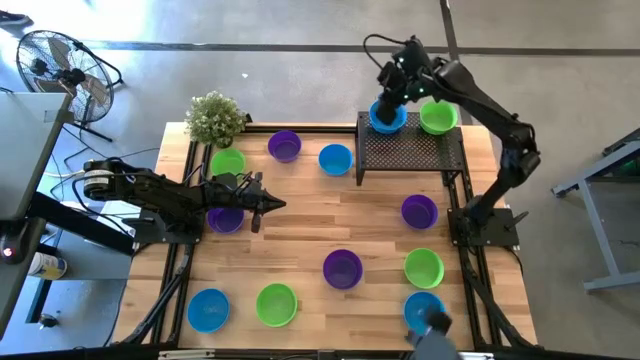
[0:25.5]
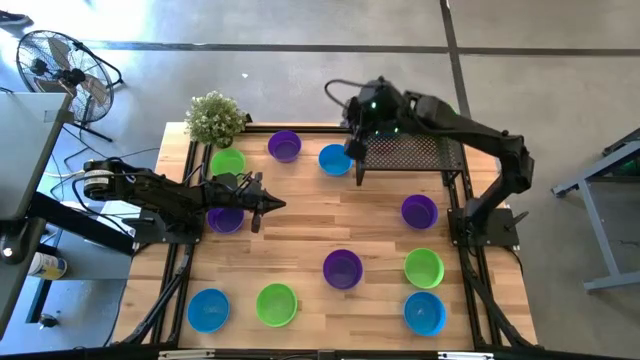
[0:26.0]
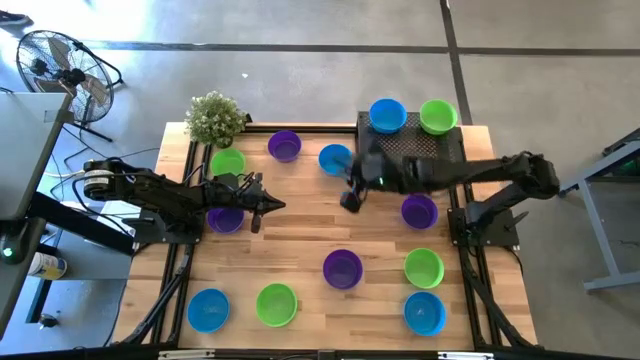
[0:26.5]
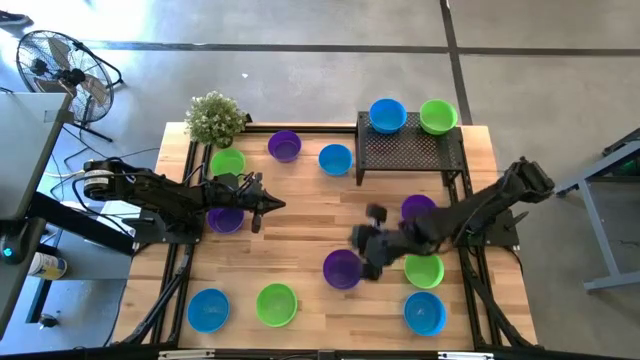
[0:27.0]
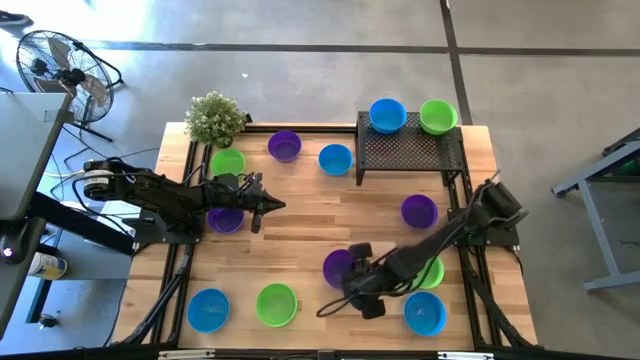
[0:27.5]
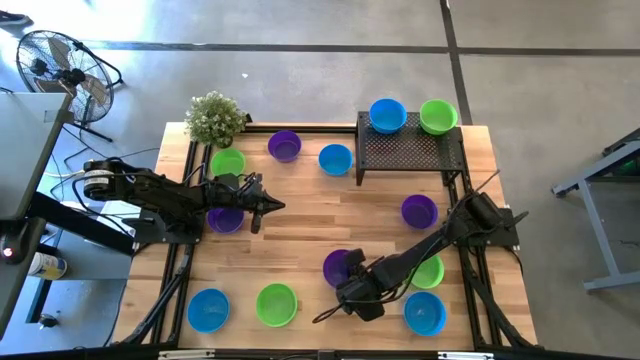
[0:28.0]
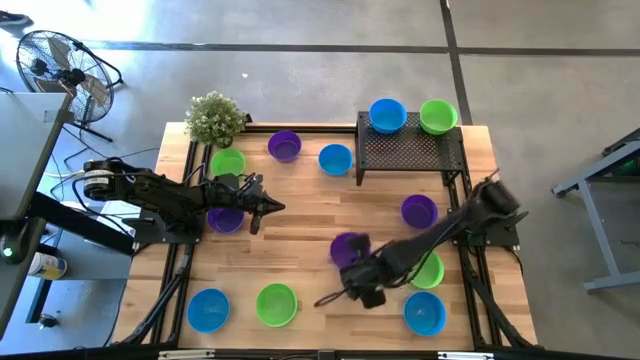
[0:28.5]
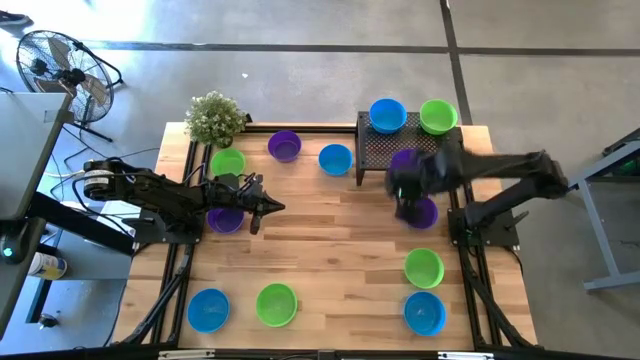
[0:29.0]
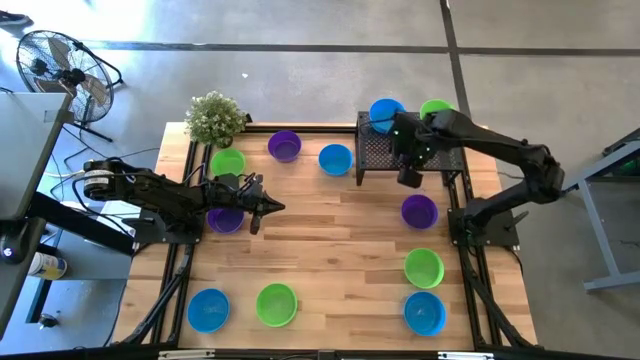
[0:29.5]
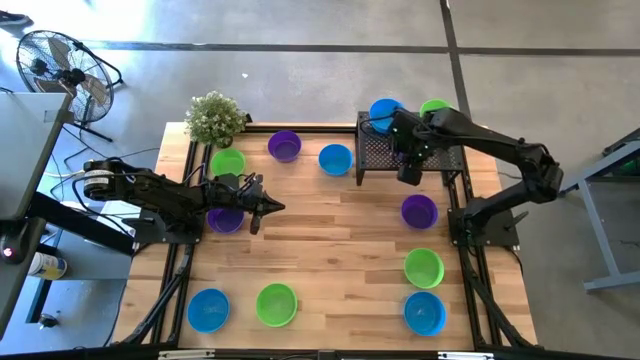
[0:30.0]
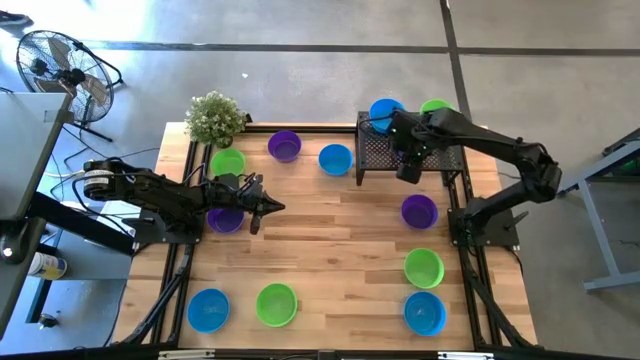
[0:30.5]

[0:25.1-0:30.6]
Task: Pick & Place Mini bowls
Put the dark blue bowl on the shelf

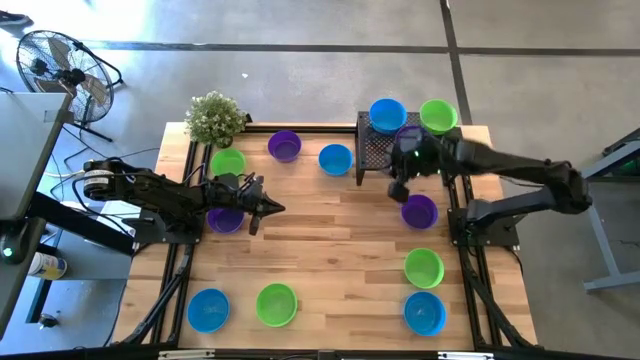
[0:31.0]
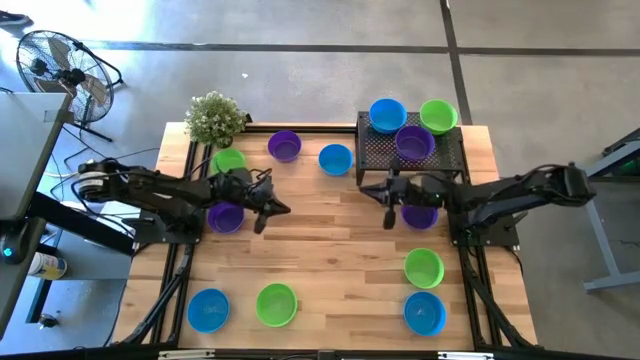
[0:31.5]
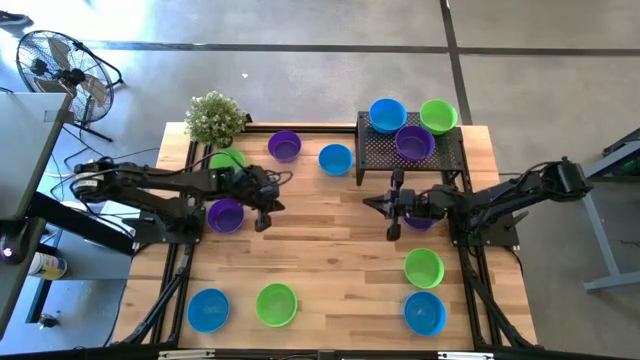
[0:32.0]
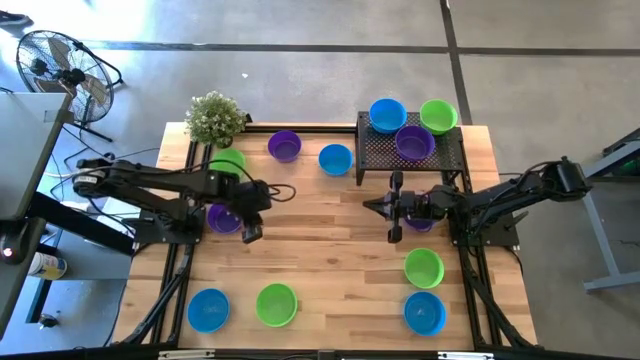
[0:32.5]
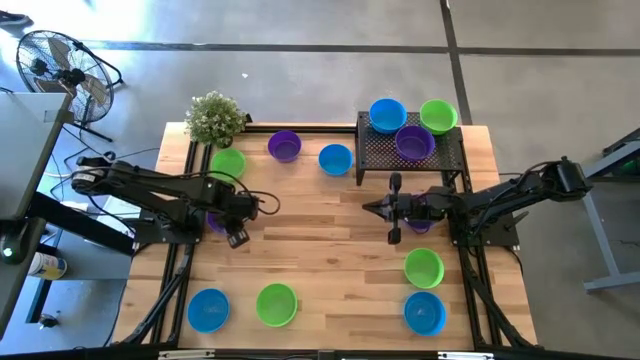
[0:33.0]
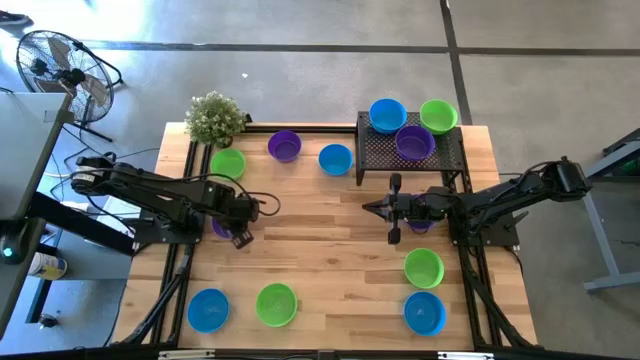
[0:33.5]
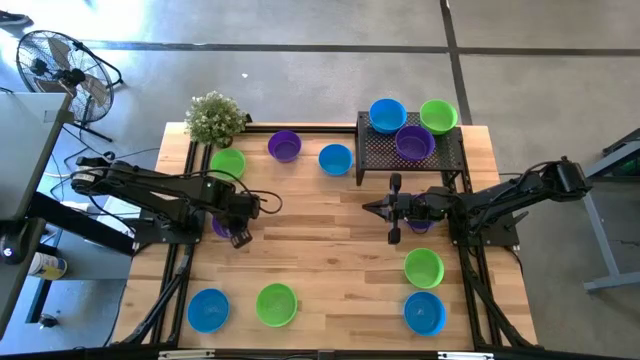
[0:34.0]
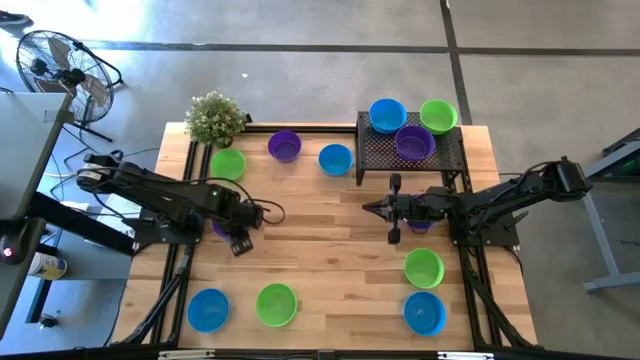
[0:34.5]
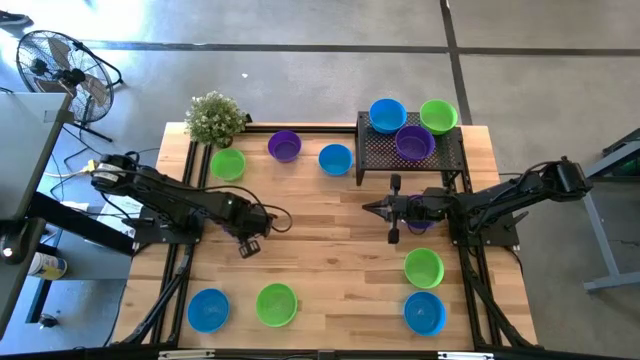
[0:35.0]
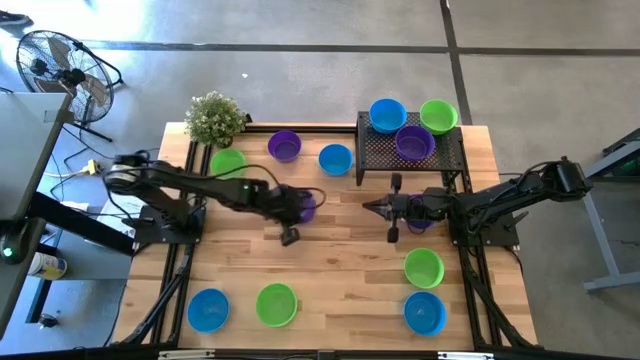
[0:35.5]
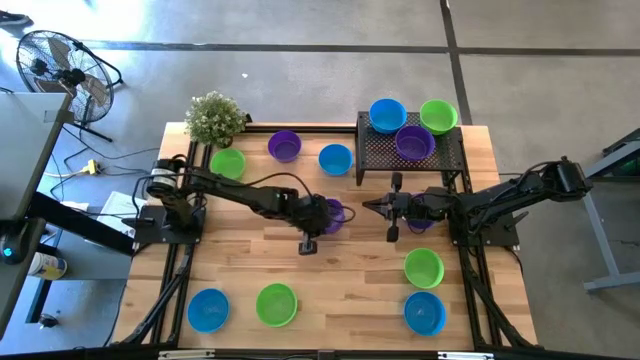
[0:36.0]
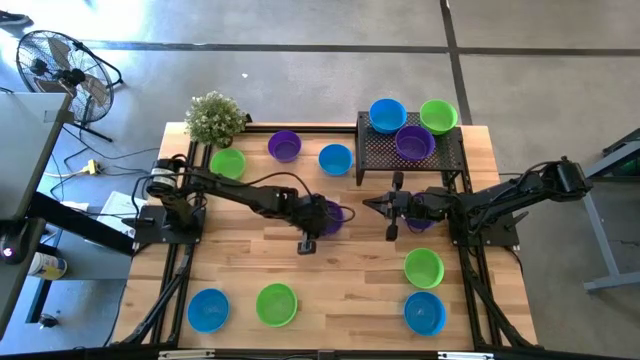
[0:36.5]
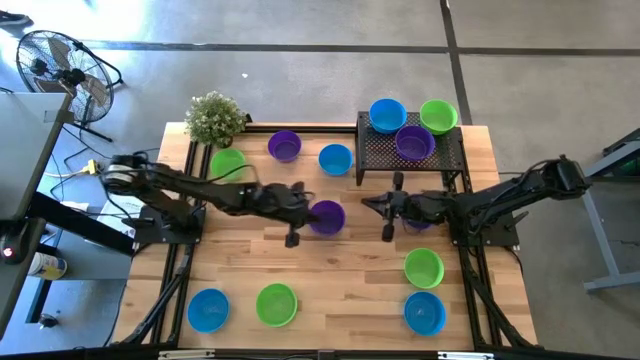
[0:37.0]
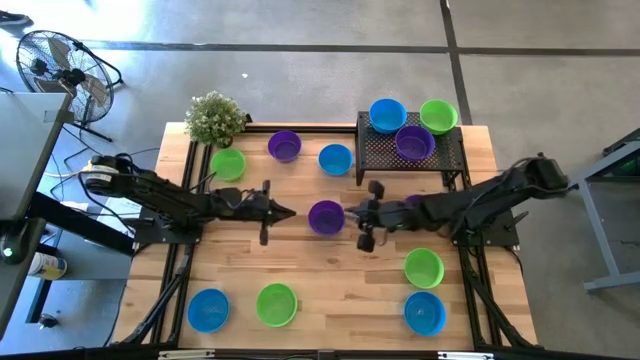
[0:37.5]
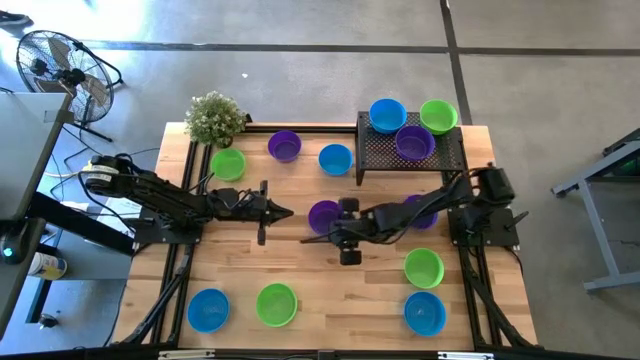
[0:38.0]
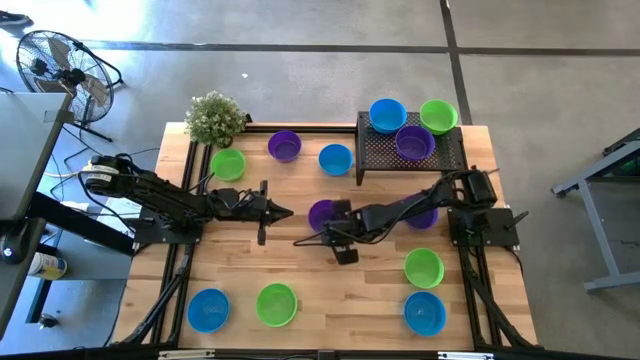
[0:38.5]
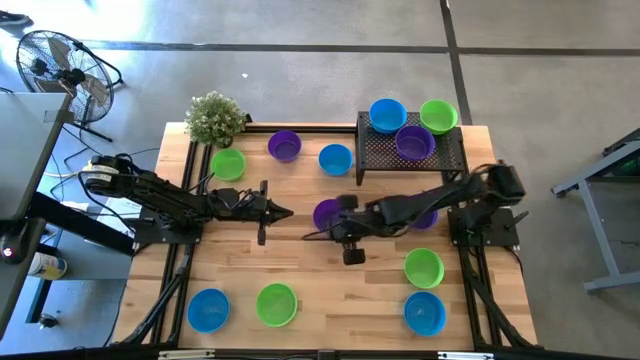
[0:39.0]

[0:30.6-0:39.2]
Stack the dark blue bowl on top of the dark blue bowl on the shelf

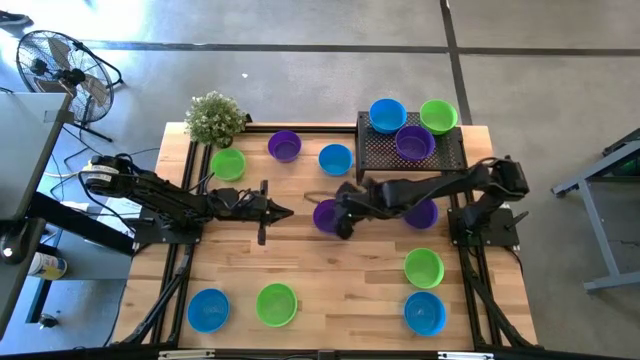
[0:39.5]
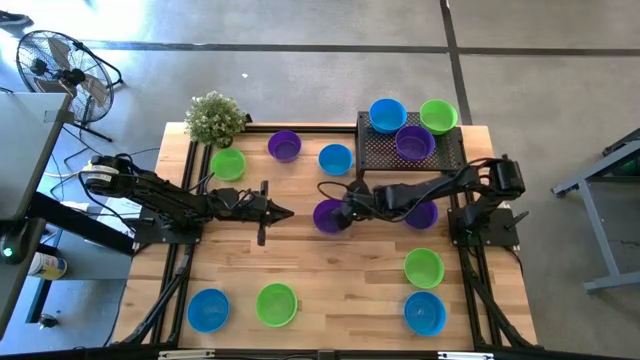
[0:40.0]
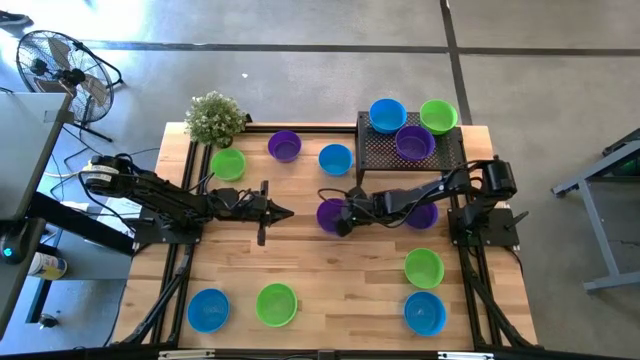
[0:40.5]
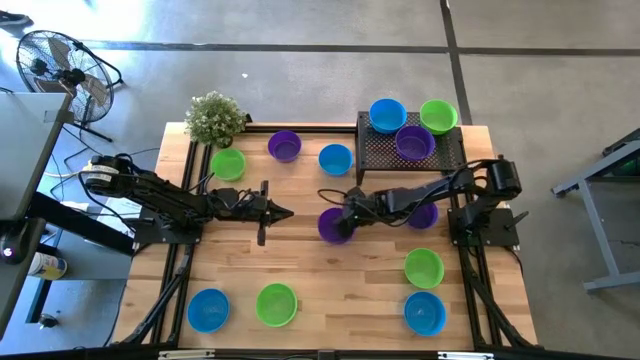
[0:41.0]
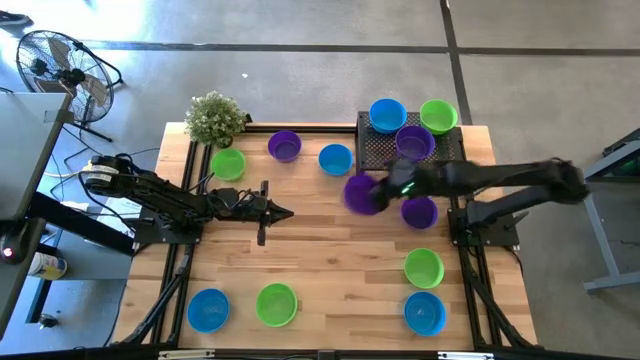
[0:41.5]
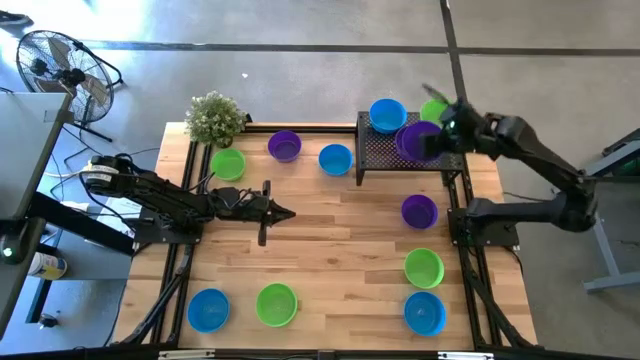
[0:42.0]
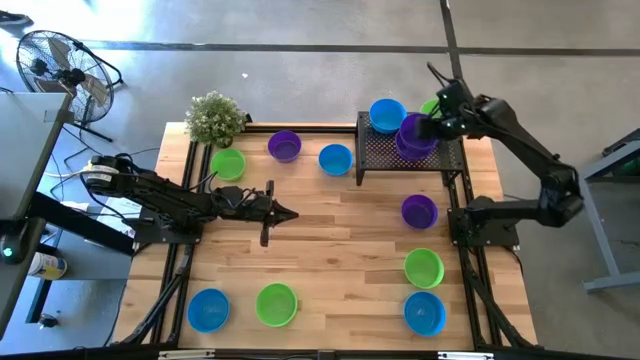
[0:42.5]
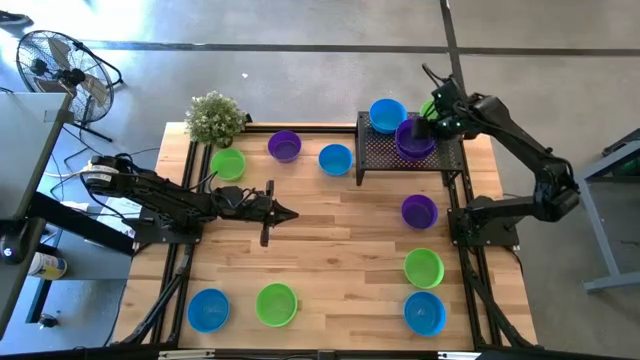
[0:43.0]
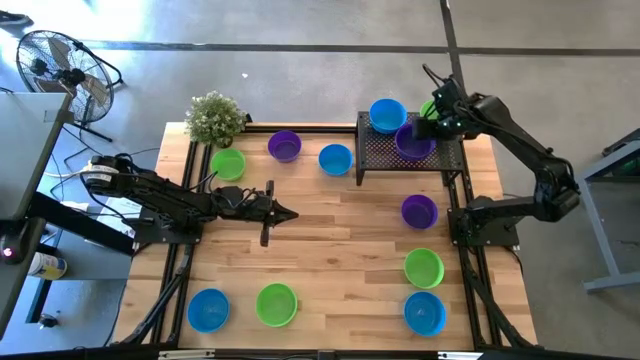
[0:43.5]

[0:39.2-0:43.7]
Stack the dark blue bowl on top of the dark blue bowl on the shelf

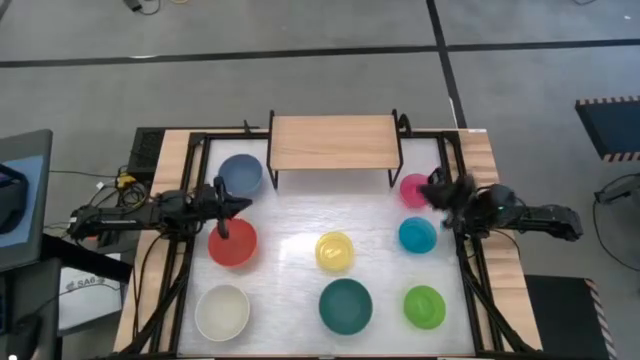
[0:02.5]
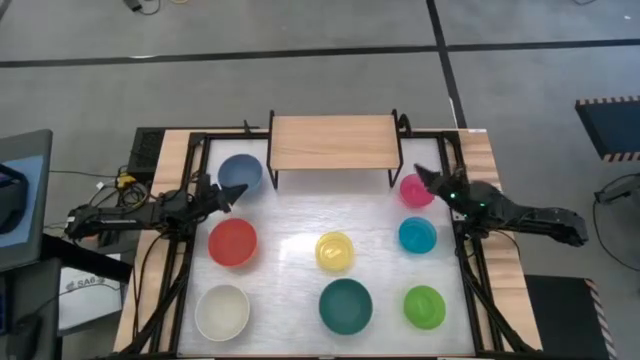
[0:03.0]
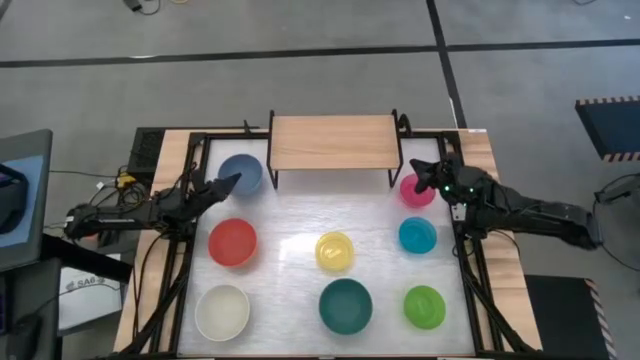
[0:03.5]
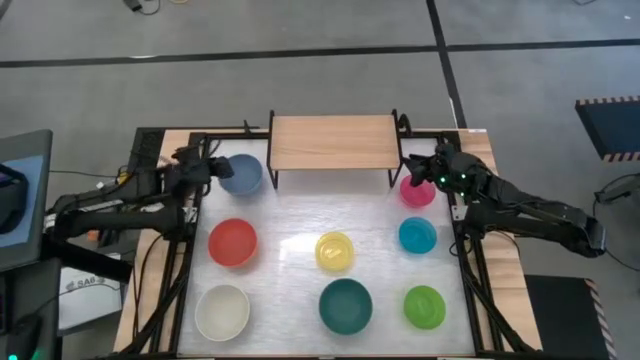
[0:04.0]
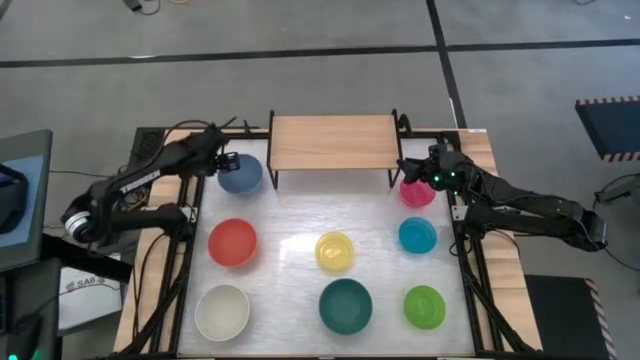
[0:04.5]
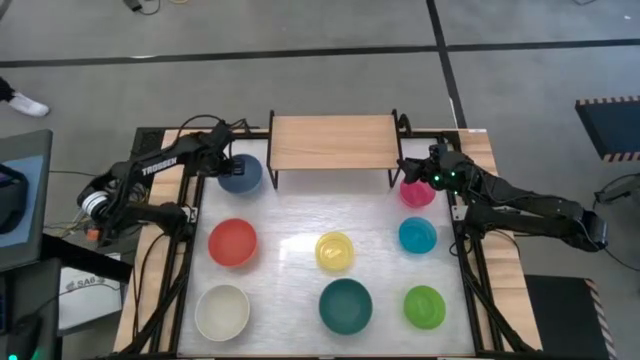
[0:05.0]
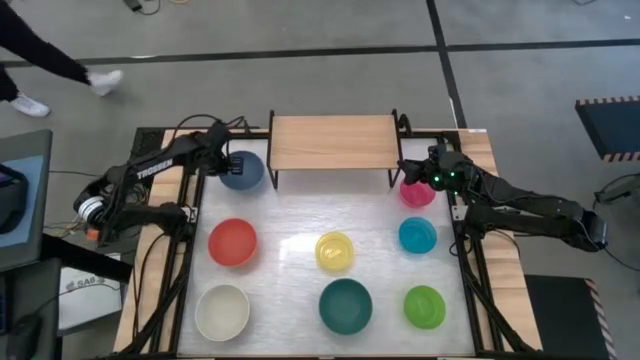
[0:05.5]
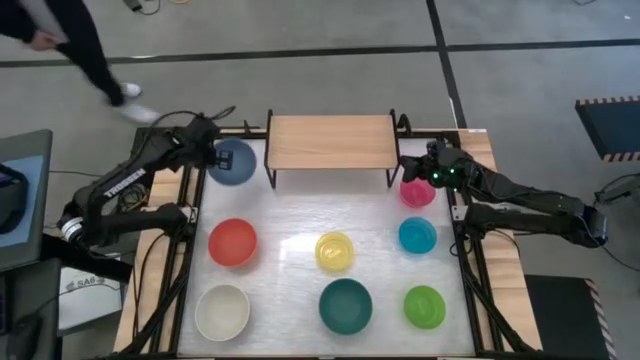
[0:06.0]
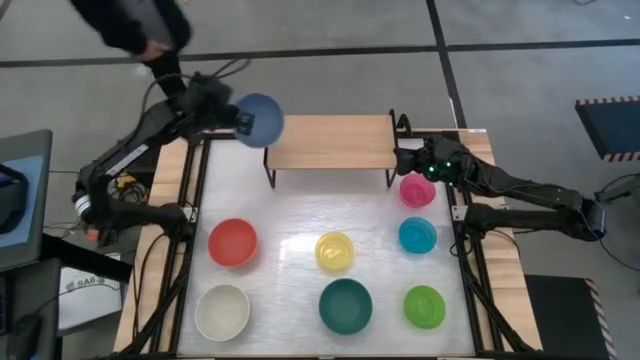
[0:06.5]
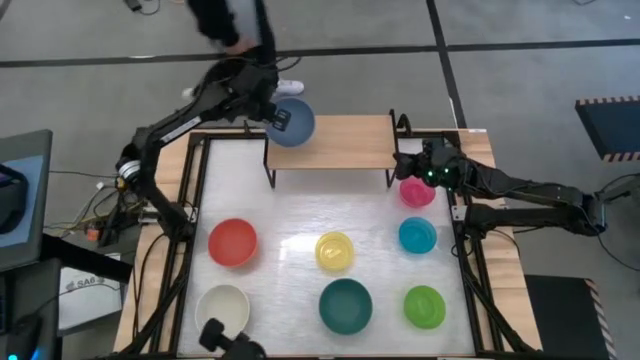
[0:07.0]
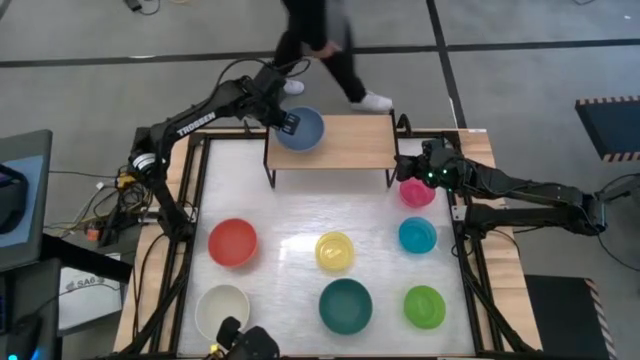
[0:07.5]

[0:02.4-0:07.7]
Task: Place and stack bowls onto a shelf
Put the blue bowl on the shelf
